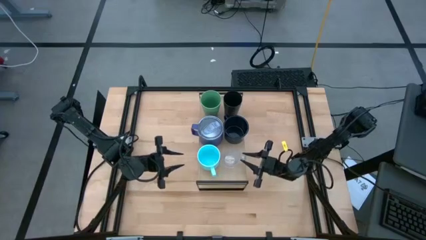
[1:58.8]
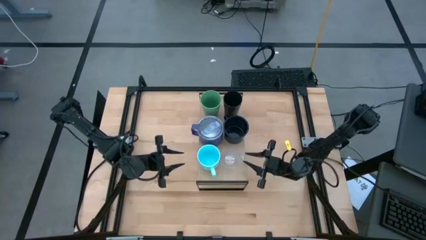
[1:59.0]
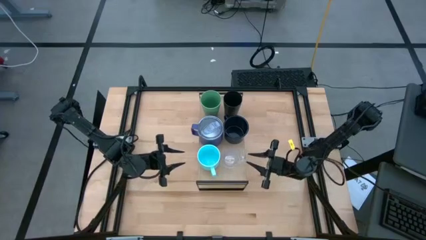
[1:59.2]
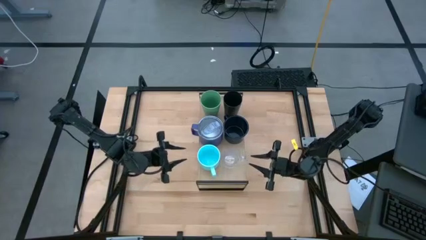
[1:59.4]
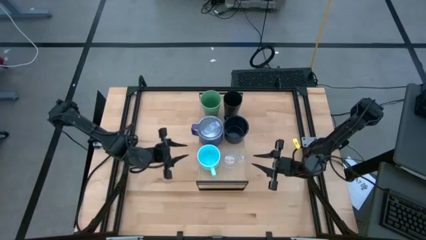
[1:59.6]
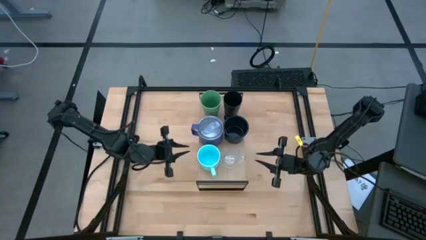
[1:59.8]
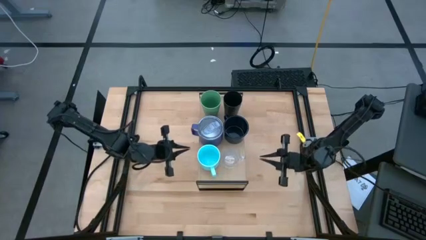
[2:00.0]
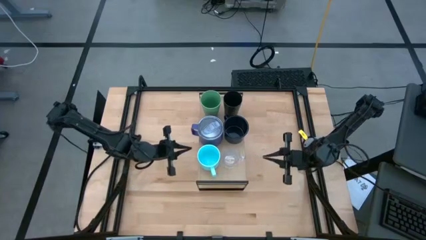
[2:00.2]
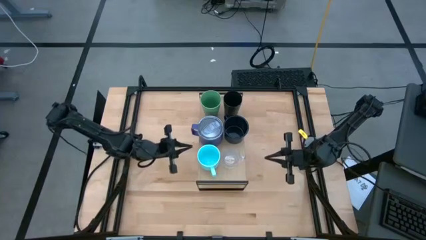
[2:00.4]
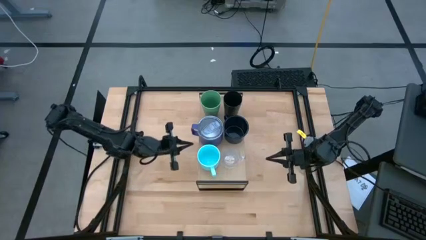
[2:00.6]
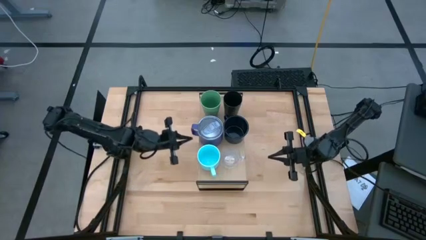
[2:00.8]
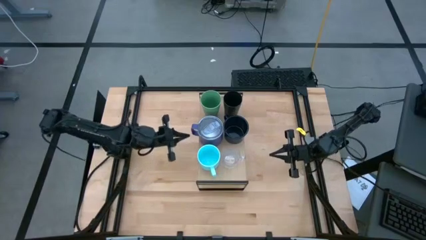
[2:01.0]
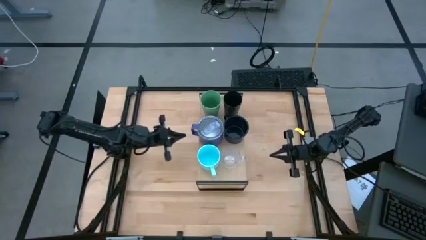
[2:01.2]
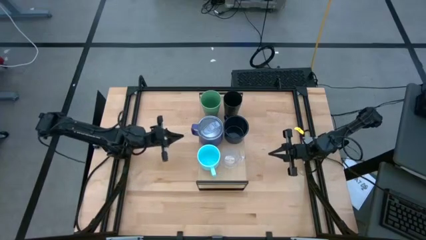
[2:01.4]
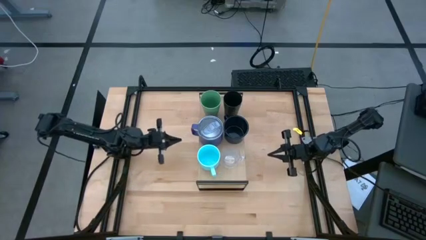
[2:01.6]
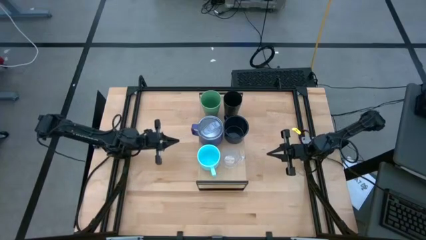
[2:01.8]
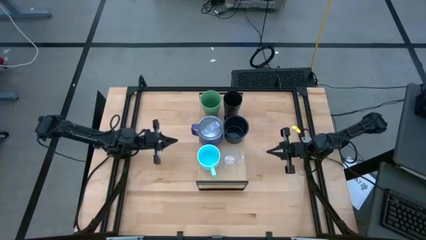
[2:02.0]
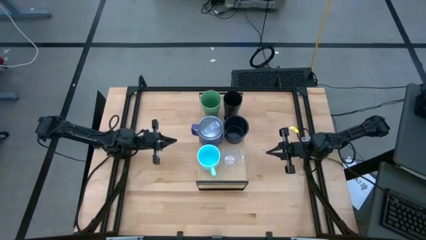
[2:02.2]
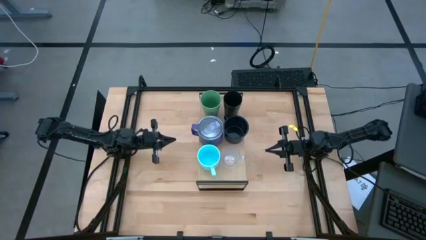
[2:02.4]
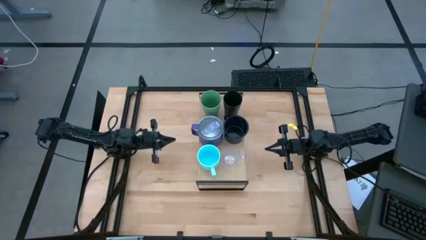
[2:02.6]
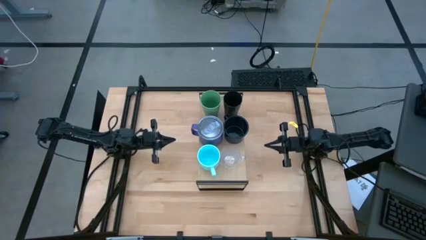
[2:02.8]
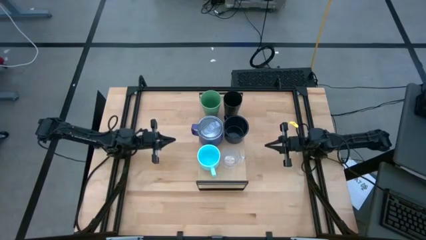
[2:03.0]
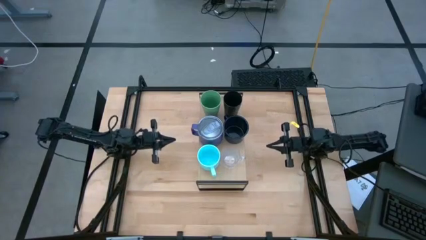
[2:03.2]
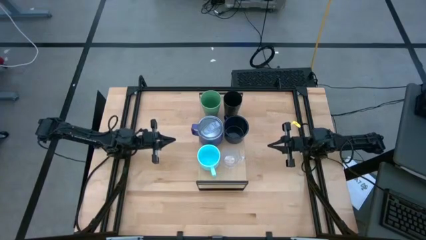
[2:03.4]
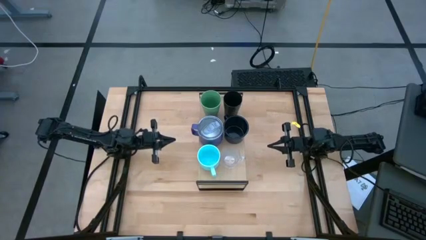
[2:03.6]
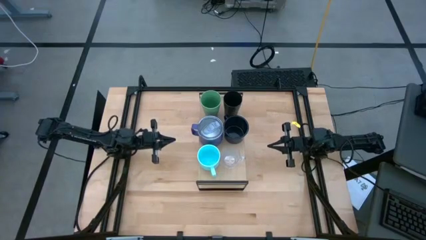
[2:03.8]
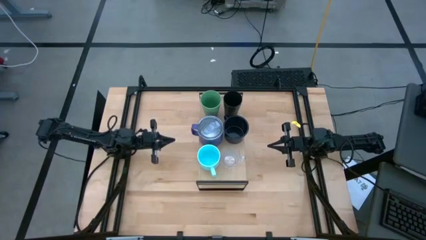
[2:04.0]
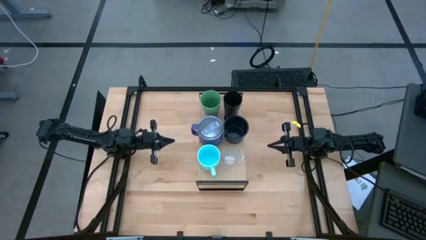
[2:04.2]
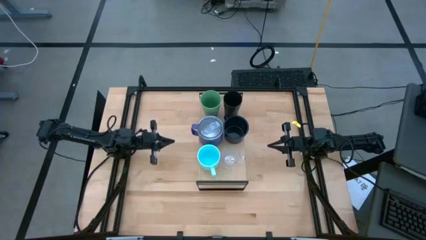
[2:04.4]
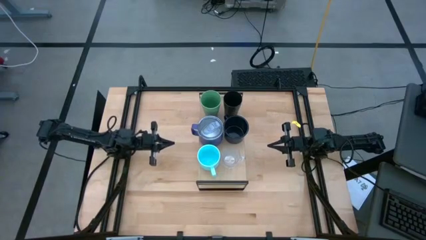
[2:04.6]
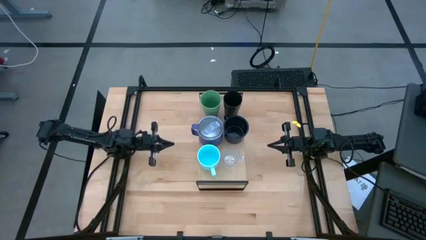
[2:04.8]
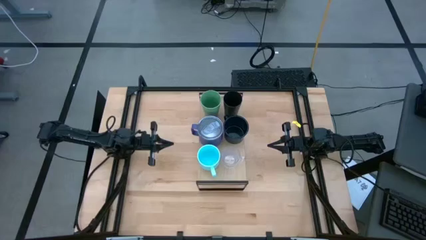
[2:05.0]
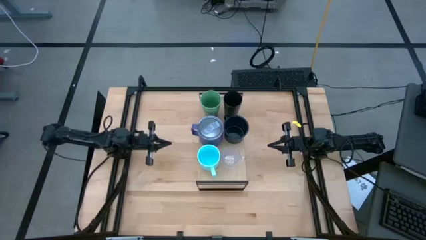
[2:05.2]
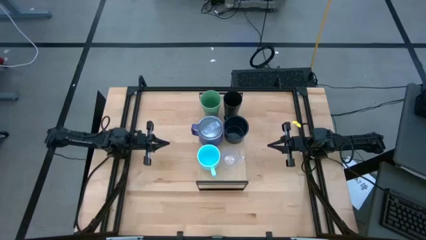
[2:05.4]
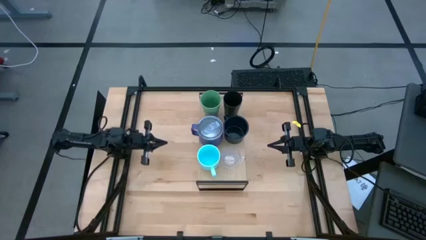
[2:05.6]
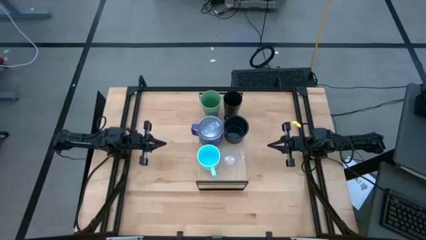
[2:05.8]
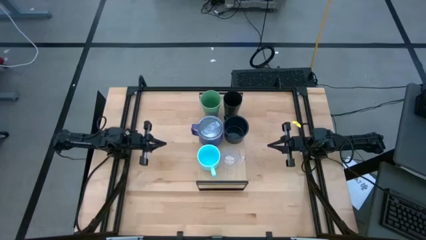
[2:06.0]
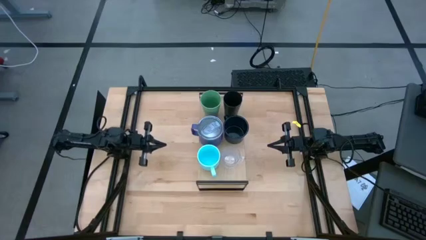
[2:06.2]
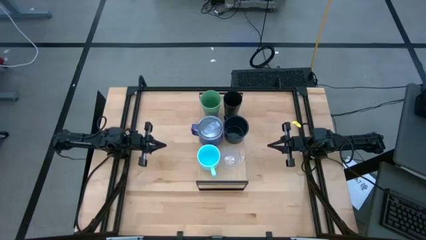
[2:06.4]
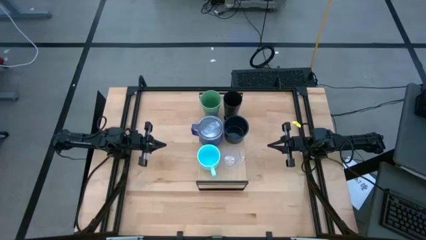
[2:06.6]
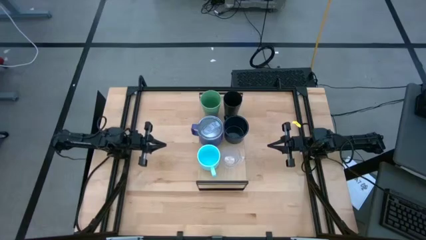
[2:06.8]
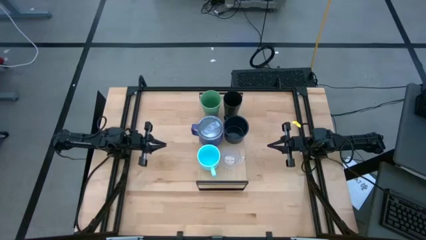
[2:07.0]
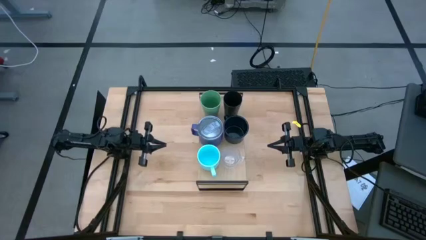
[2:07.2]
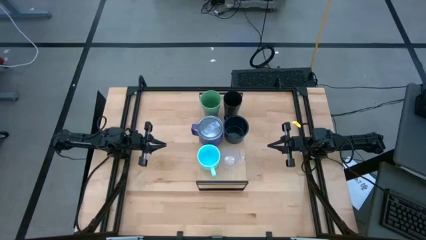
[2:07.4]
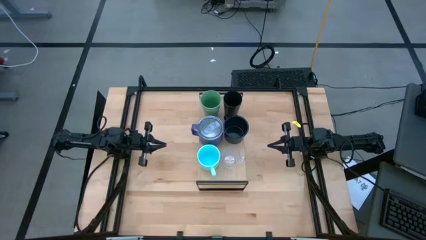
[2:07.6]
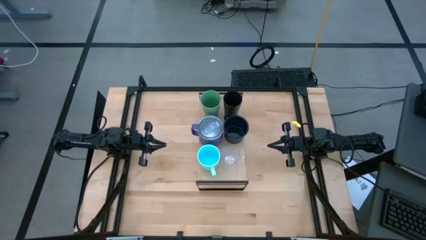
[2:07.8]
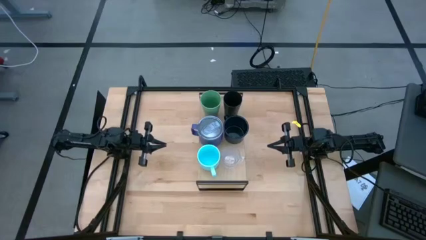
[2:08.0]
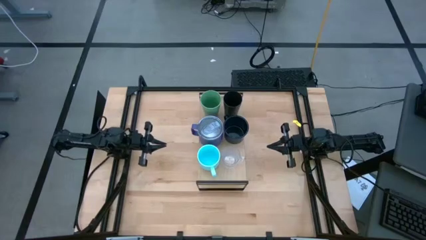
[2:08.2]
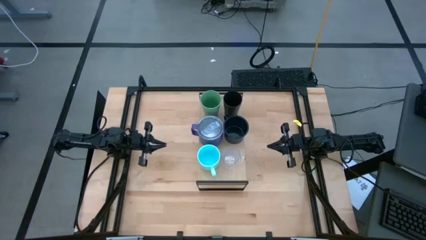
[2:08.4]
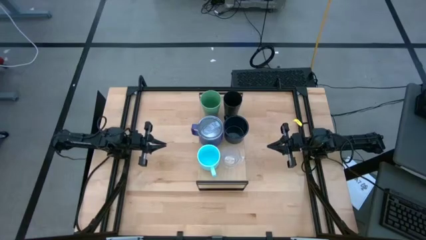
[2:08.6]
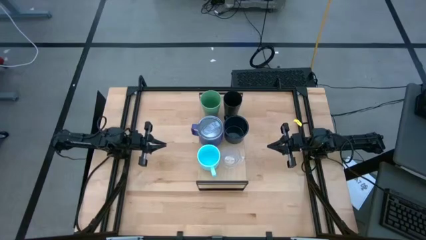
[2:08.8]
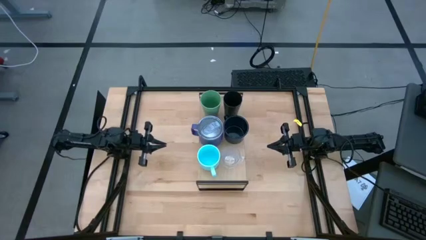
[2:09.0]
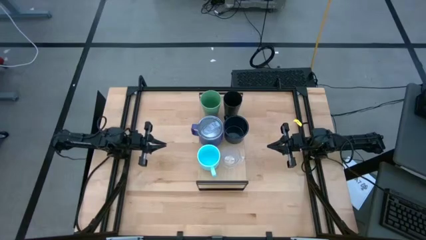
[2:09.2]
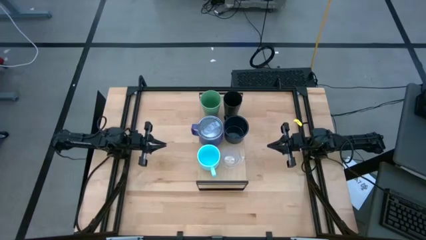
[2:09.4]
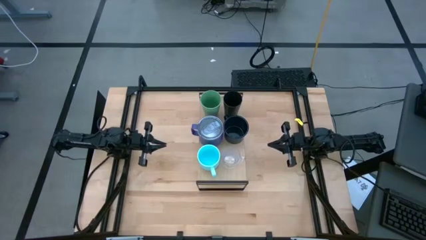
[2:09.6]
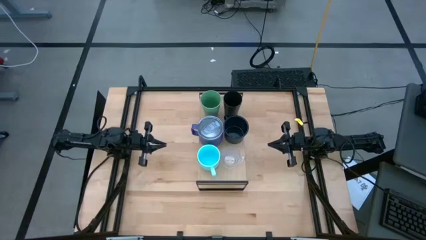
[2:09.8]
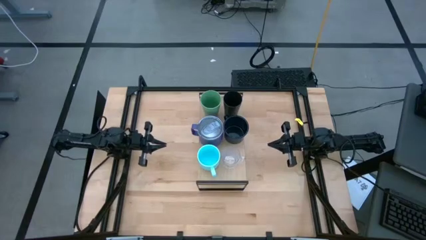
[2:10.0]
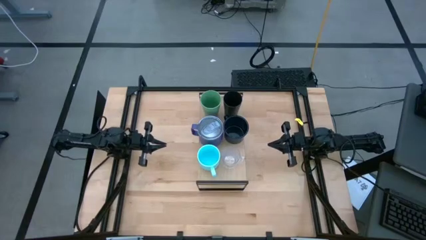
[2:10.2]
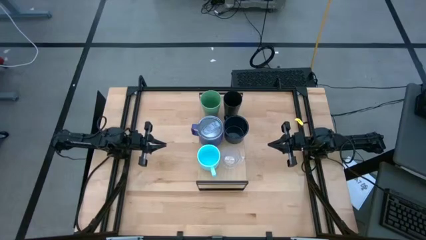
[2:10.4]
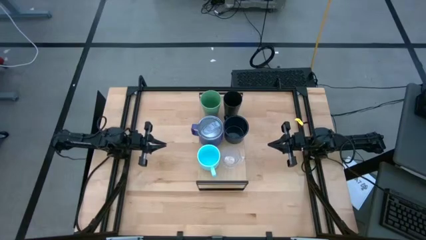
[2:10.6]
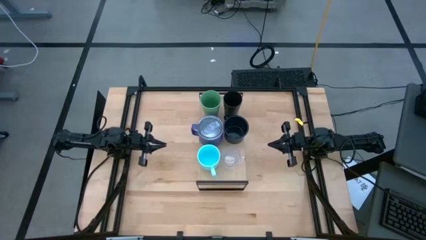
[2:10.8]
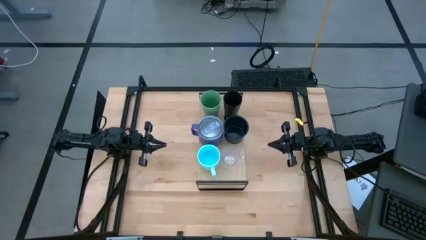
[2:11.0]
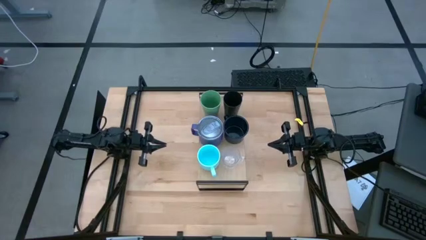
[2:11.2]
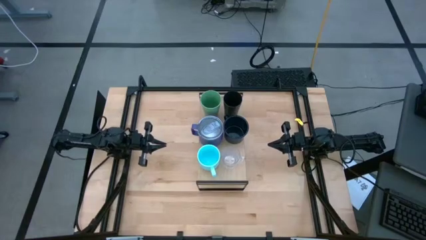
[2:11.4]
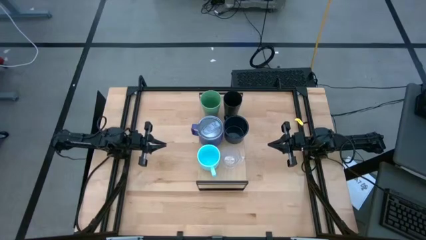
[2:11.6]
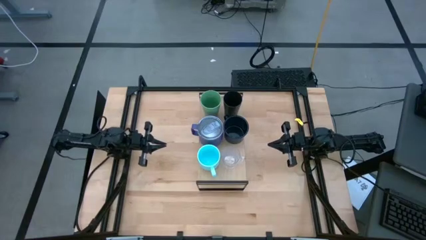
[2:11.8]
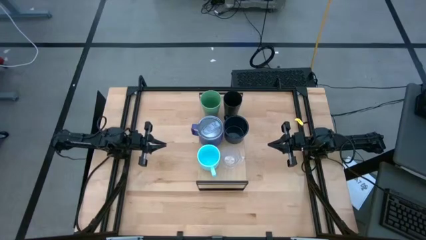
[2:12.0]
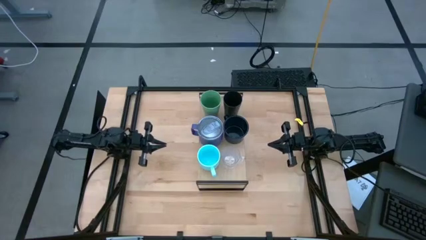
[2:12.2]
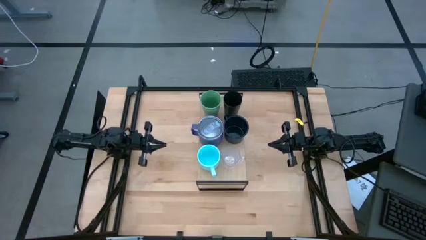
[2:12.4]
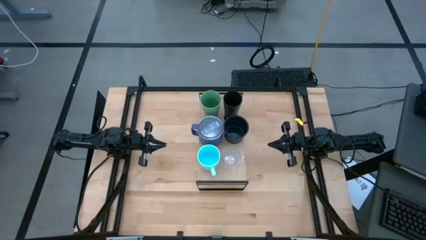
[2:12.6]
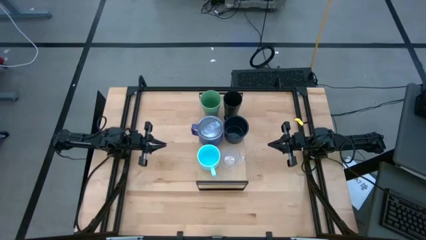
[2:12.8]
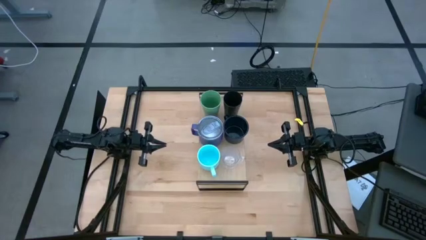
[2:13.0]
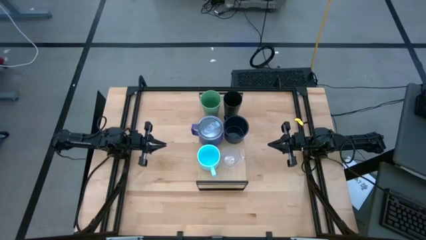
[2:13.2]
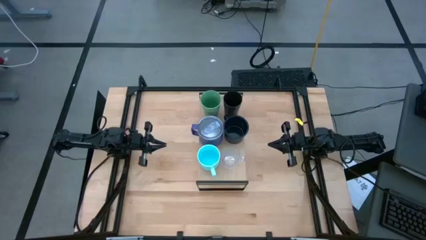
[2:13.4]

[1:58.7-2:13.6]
Task: Stack small to large cups/mugs on shelf
Return to Home Position

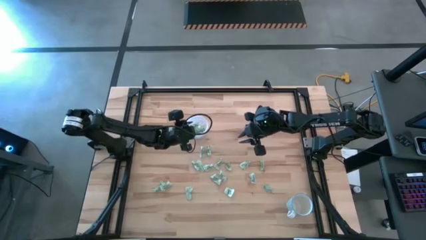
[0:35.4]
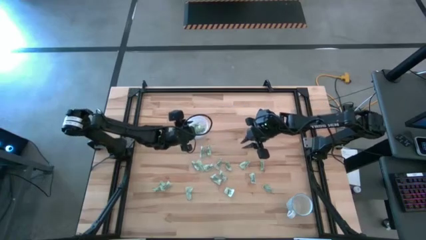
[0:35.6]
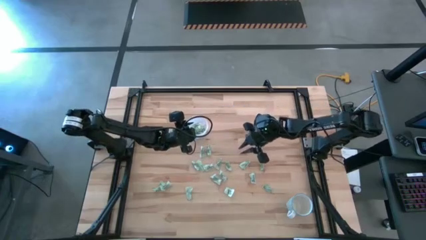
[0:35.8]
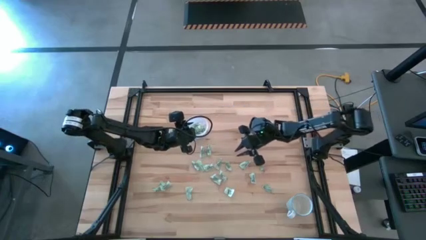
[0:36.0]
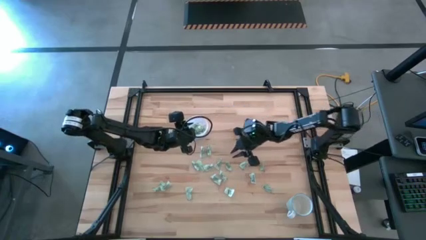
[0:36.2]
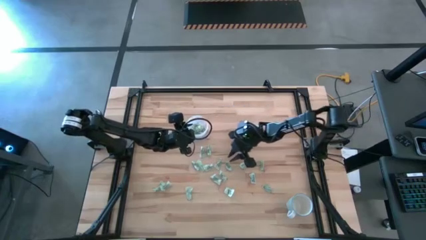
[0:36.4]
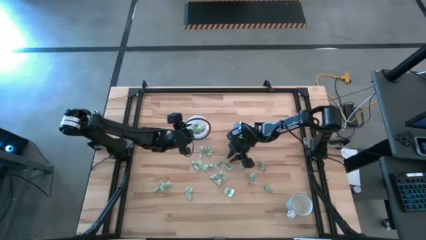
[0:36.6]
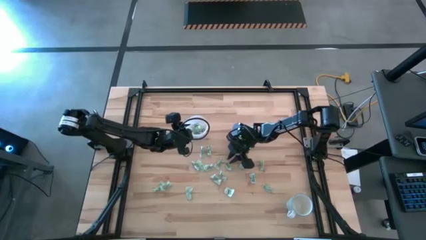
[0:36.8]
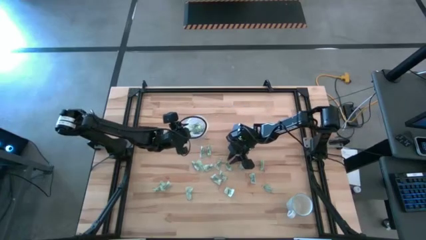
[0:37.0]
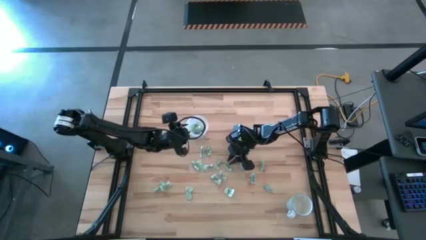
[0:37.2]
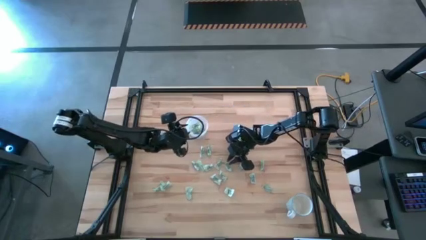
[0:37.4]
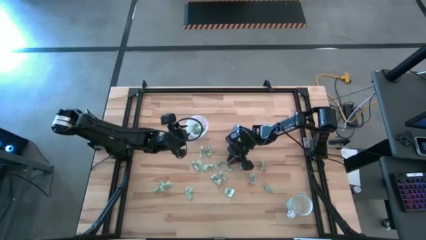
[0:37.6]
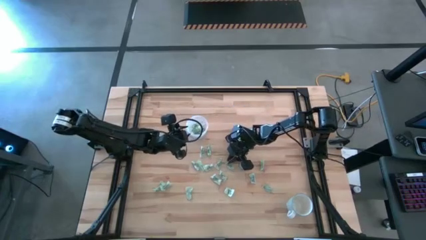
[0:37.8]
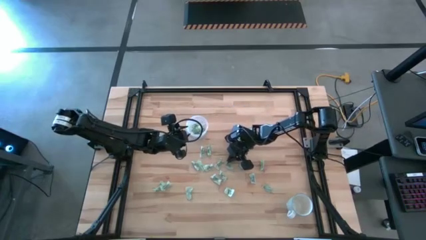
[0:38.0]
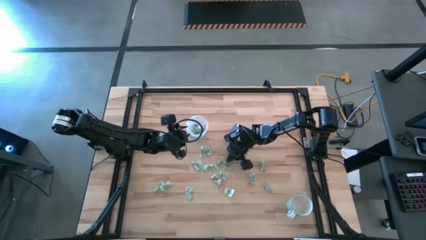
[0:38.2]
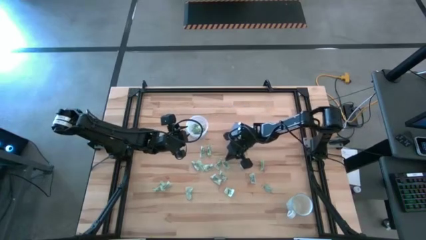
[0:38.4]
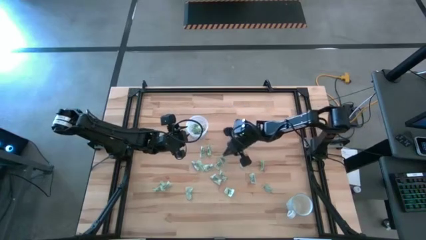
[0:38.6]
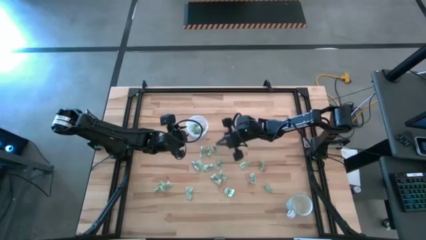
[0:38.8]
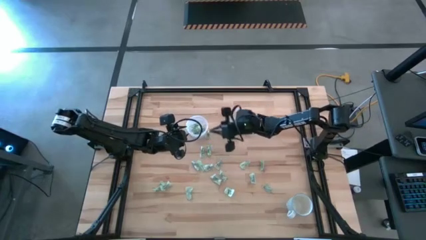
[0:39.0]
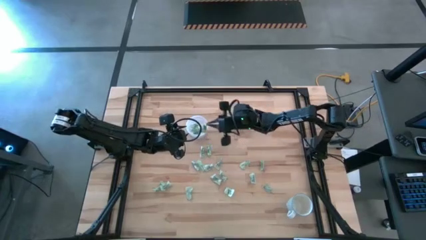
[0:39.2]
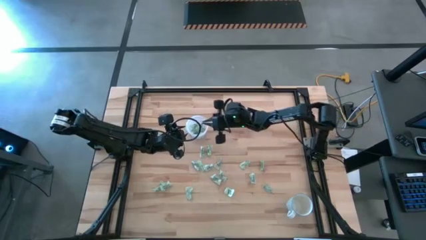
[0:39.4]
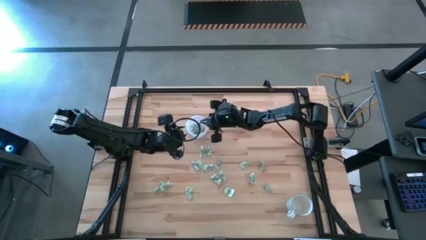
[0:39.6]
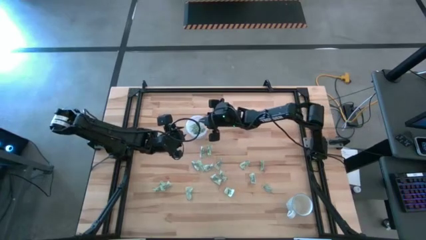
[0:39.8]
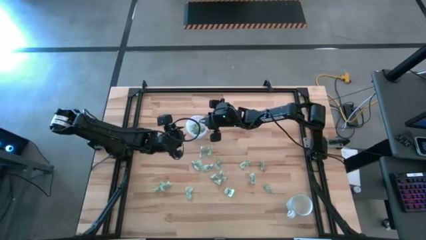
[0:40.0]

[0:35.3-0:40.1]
Task: Pick and place Stevia / Truvia into bins
Put the stevia packet into the transparent container
